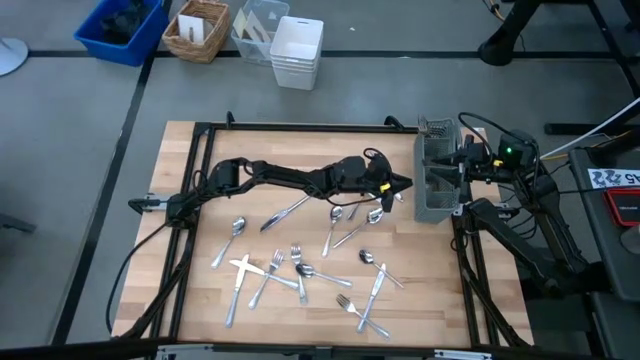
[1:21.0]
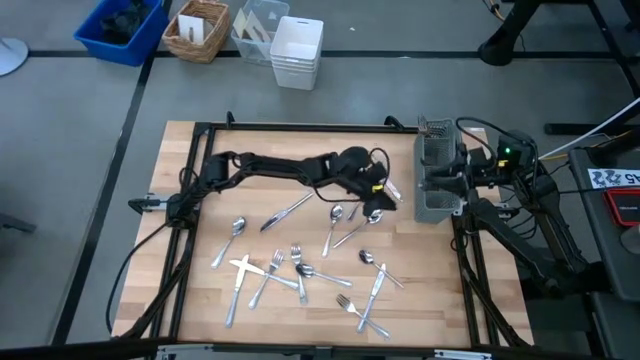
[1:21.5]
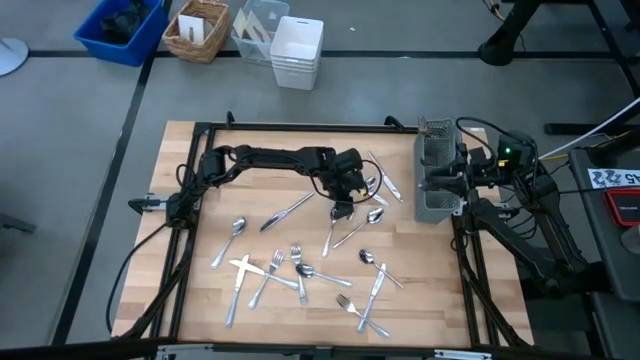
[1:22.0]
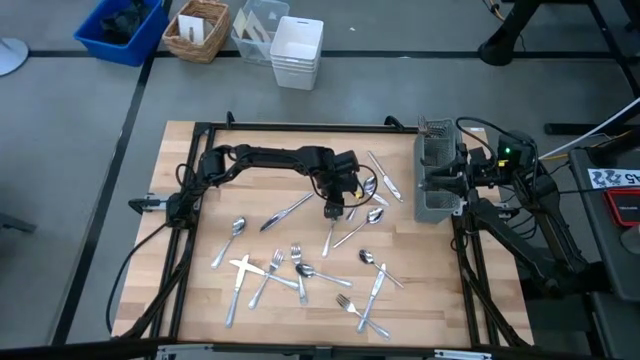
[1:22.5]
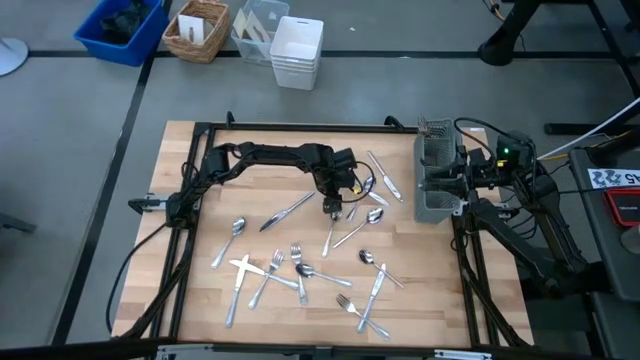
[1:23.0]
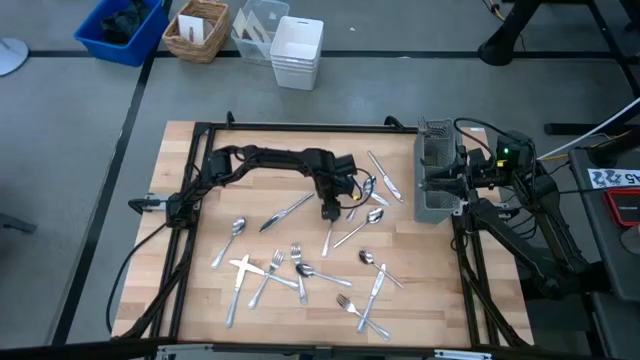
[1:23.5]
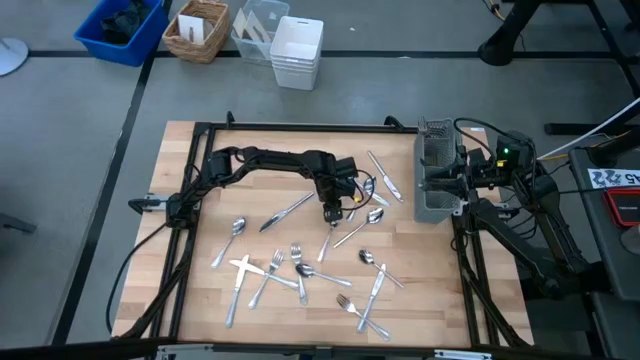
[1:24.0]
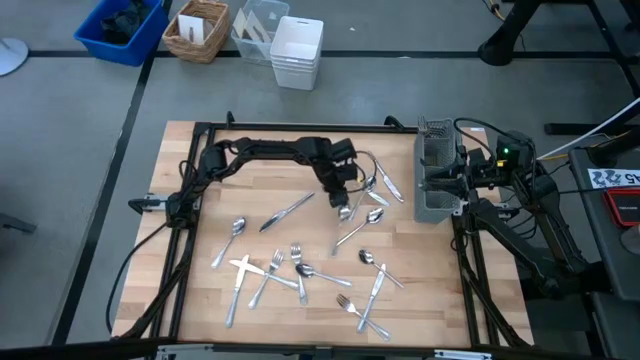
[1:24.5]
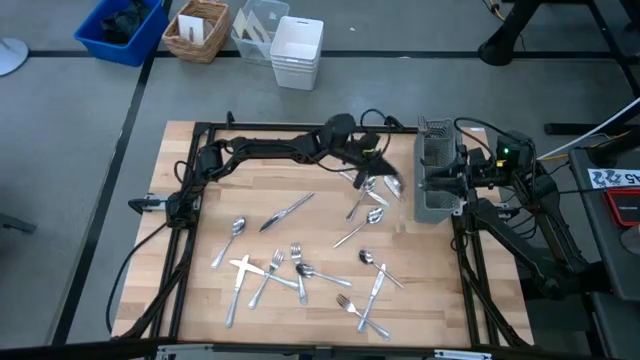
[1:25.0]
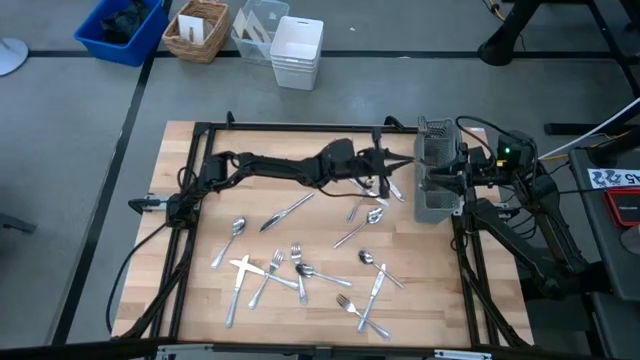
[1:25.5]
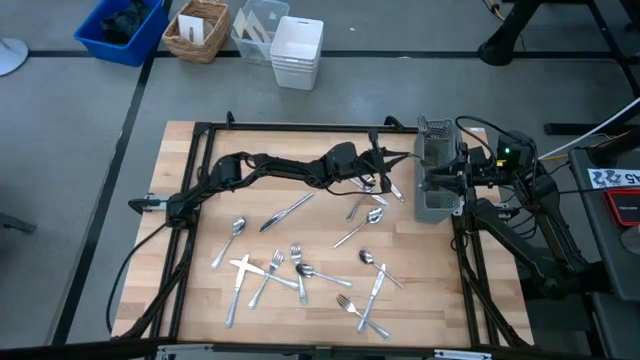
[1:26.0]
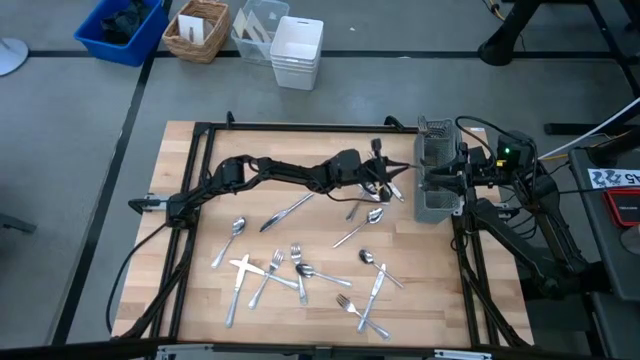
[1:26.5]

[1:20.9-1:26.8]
Task: Sort silverware
Put the spoon into the right section of the utensil holder

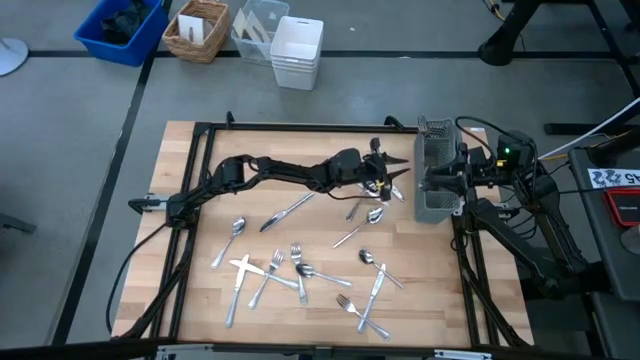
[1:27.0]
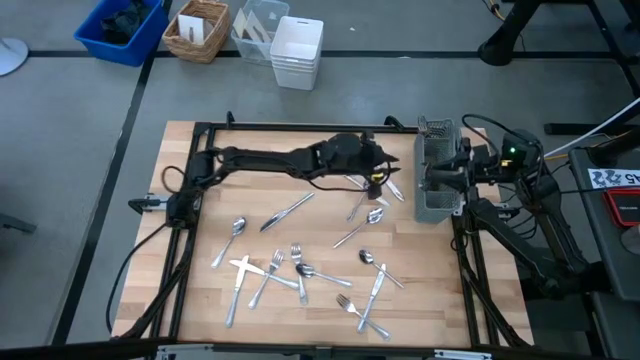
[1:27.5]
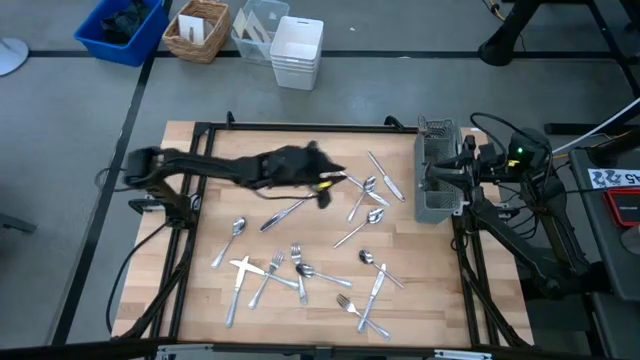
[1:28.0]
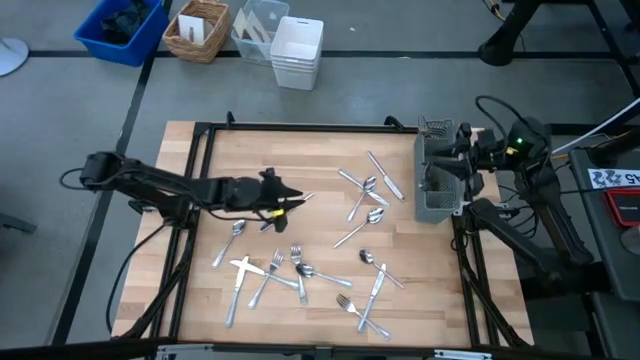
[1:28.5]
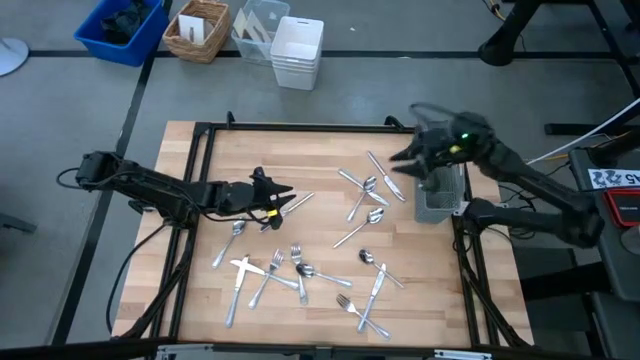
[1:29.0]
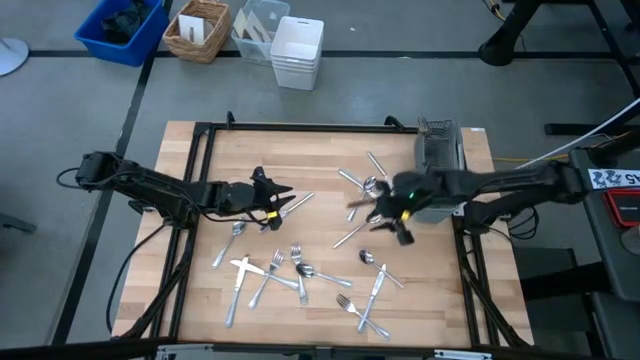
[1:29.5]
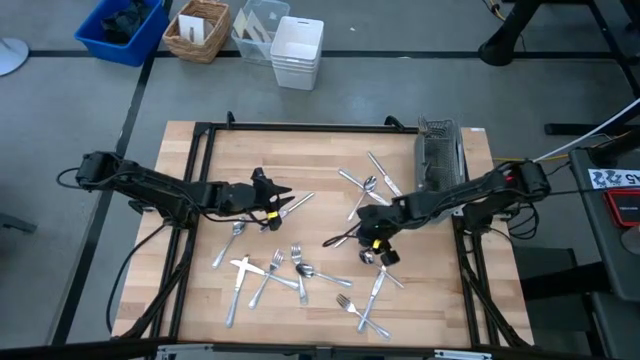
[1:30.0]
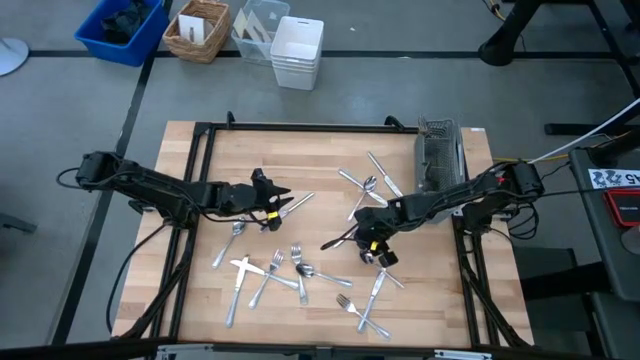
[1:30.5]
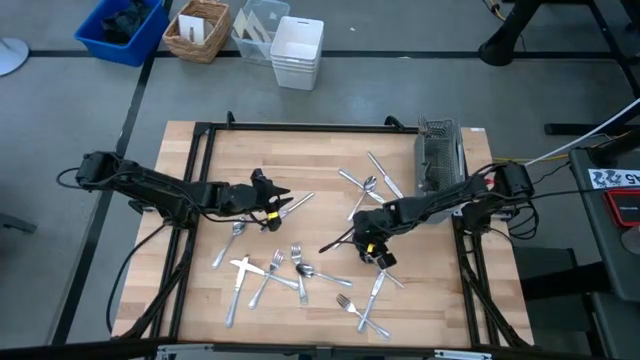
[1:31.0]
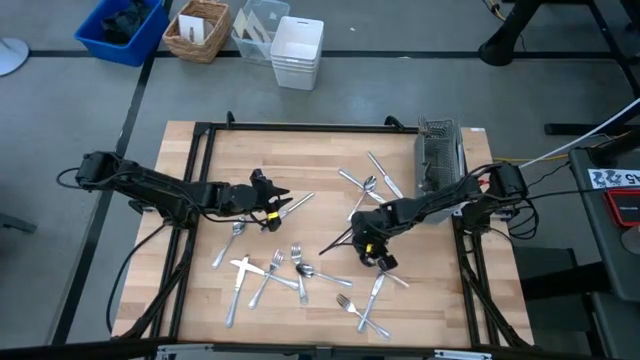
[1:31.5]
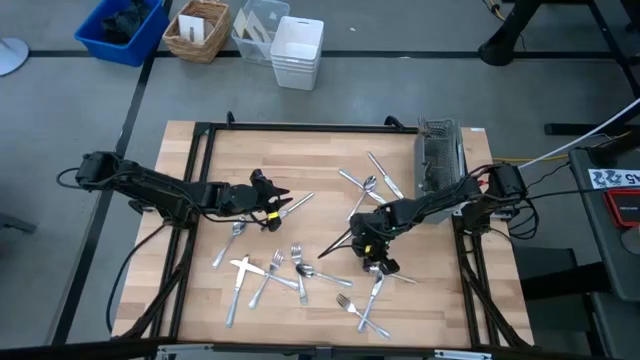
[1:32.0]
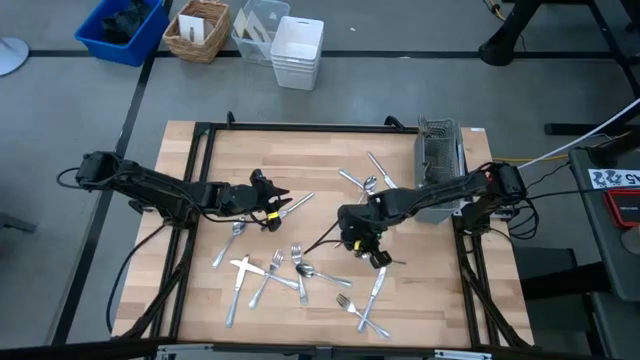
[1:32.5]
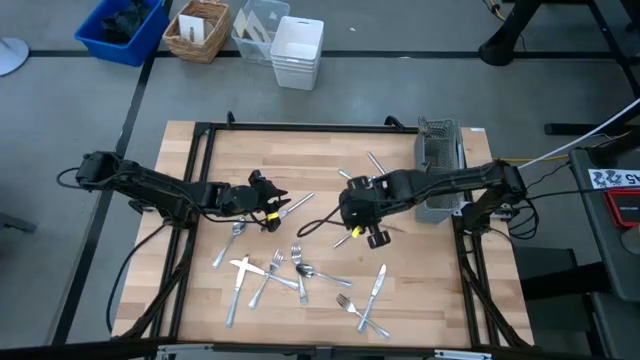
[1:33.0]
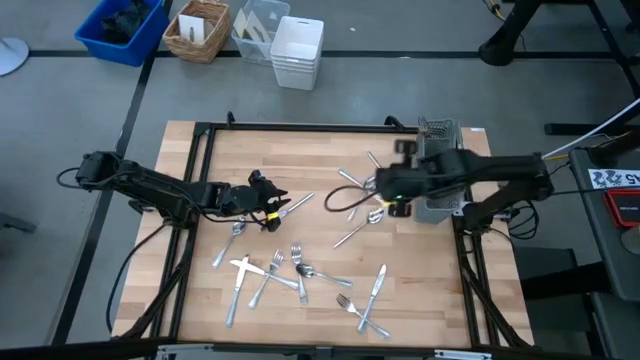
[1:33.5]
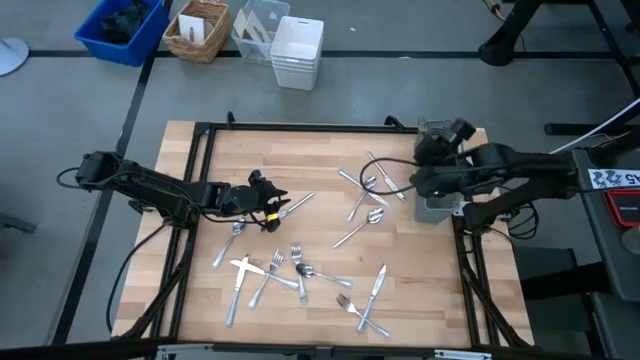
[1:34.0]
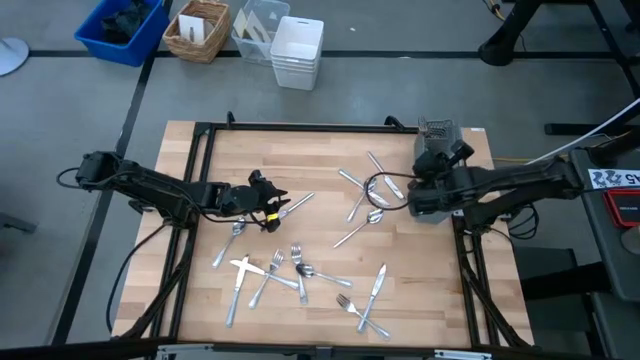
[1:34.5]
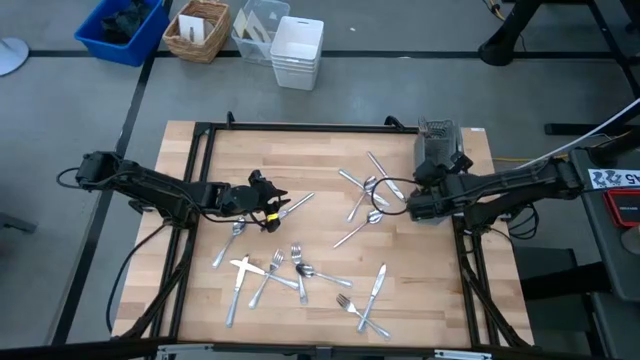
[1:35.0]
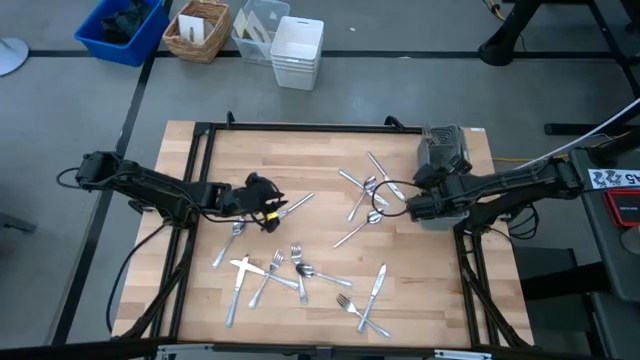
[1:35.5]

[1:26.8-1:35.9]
Put the spoon into the right section of the utensil holder

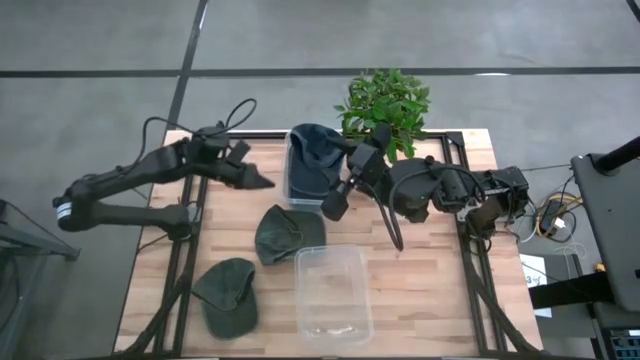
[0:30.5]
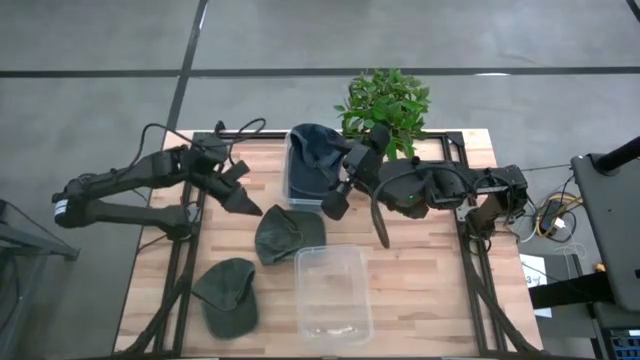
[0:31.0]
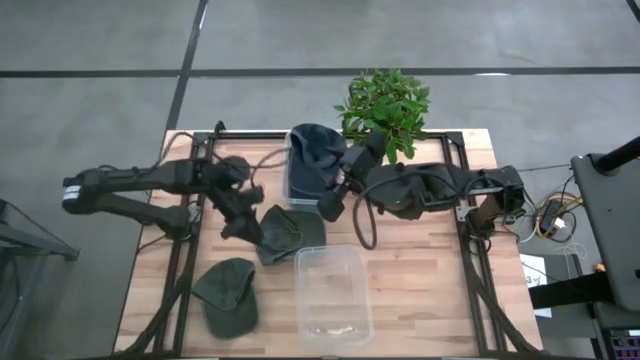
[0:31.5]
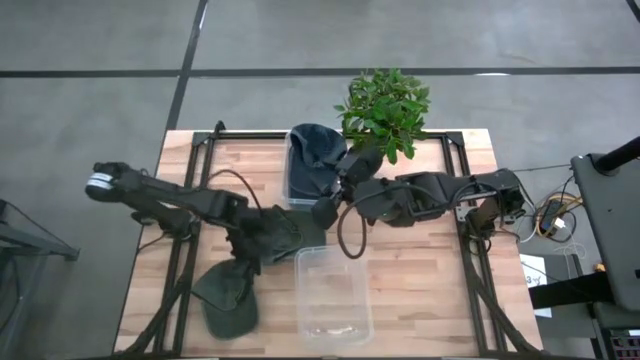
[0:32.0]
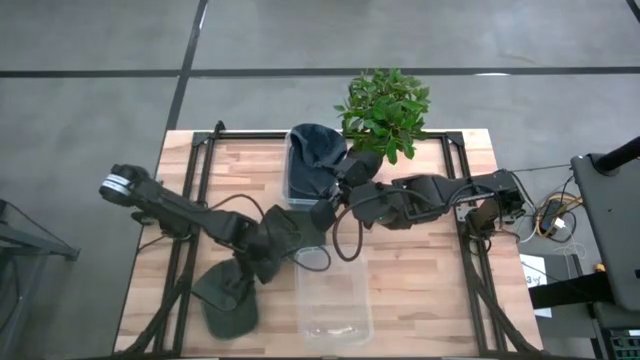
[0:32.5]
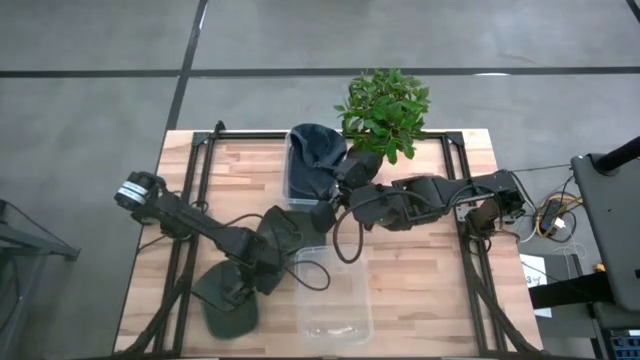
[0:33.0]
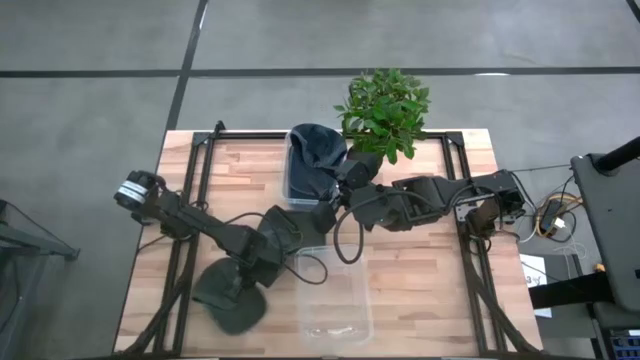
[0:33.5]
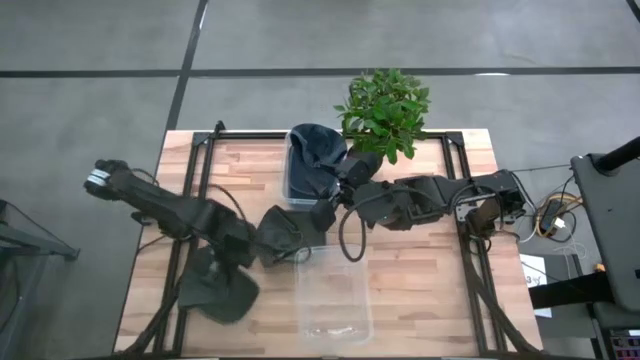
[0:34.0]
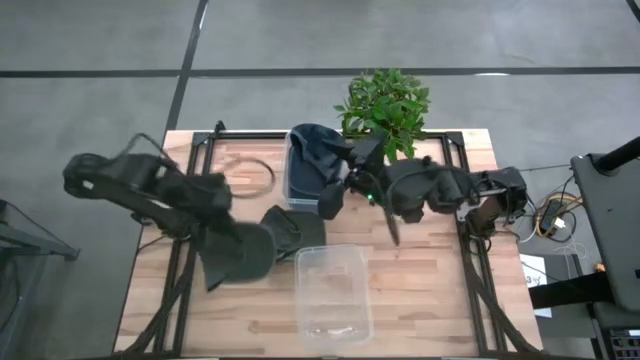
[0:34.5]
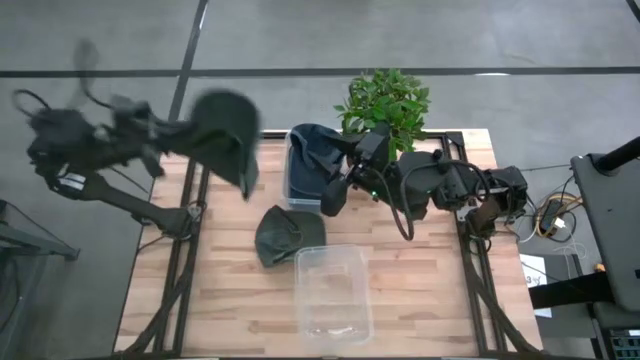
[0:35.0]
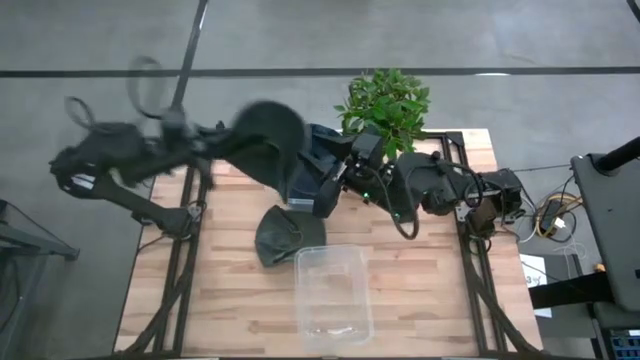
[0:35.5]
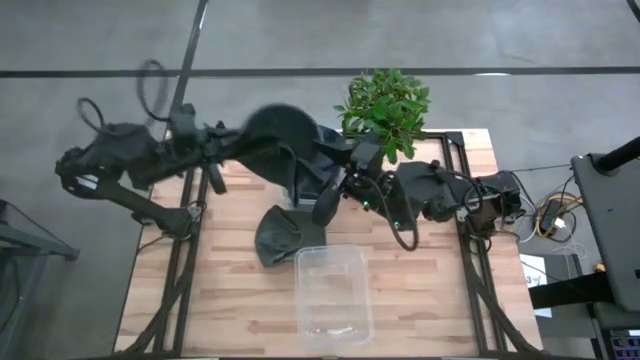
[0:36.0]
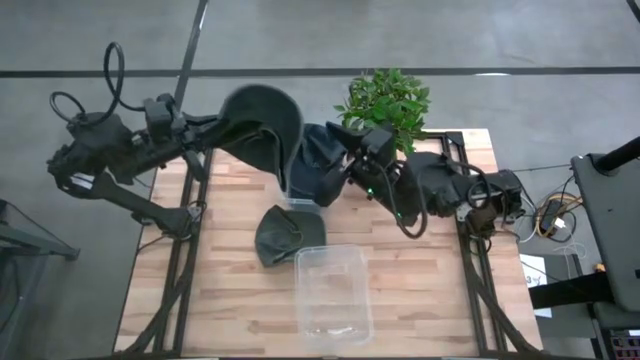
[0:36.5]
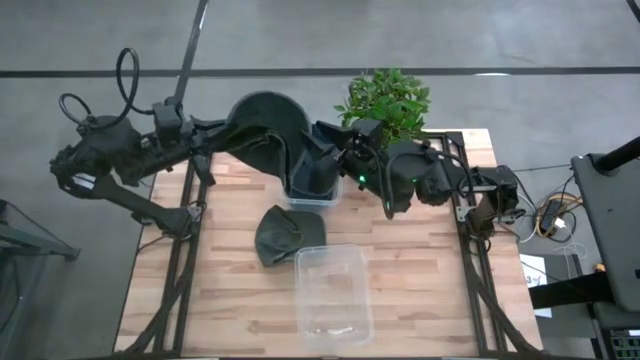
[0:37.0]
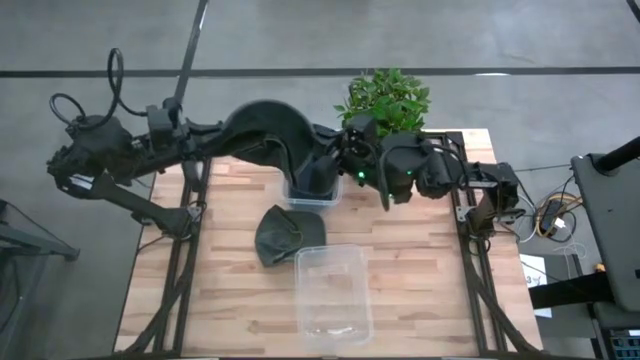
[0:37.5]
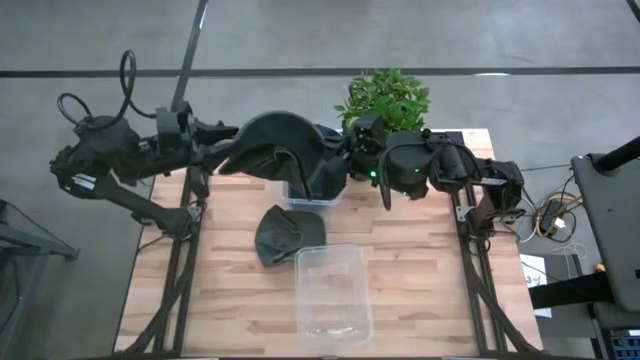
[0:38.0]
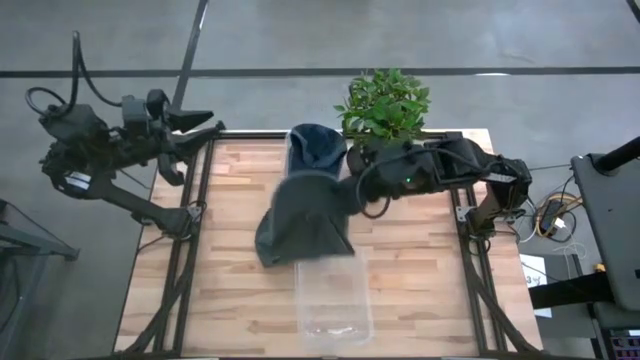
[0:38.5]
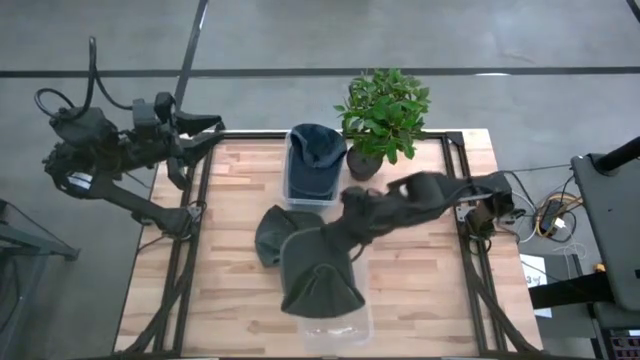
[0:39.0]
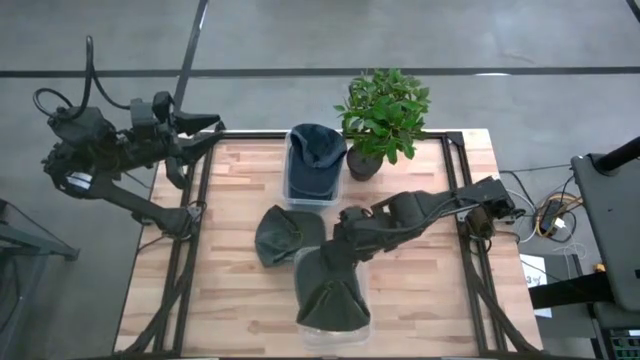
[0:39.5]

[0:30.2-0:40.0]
Task: Pick & Place hat
Put the bottom gray cap into the bottom transparent bin
